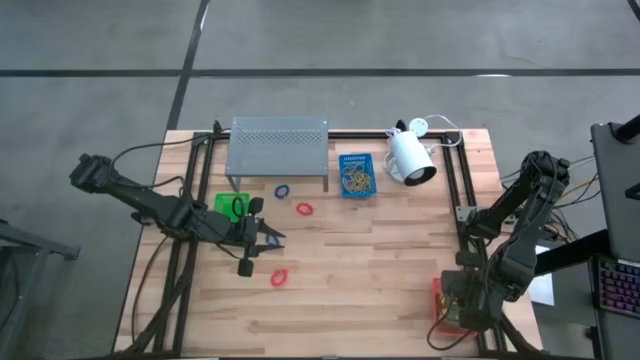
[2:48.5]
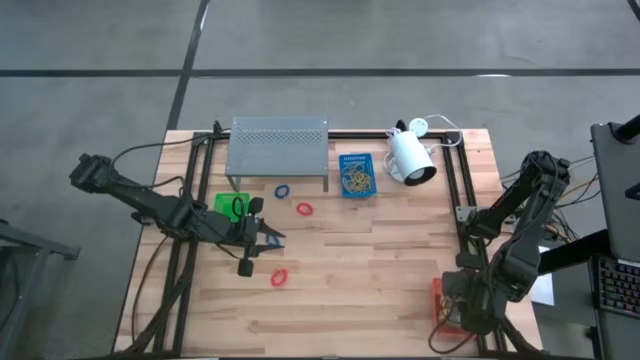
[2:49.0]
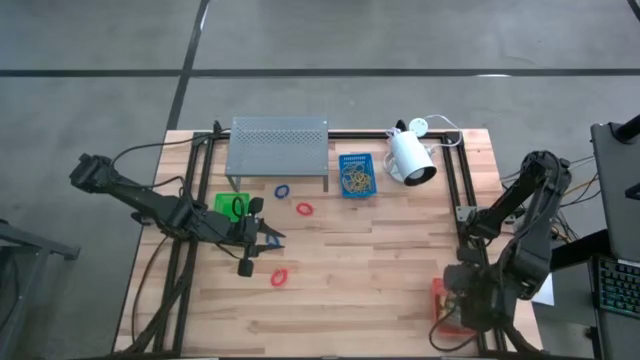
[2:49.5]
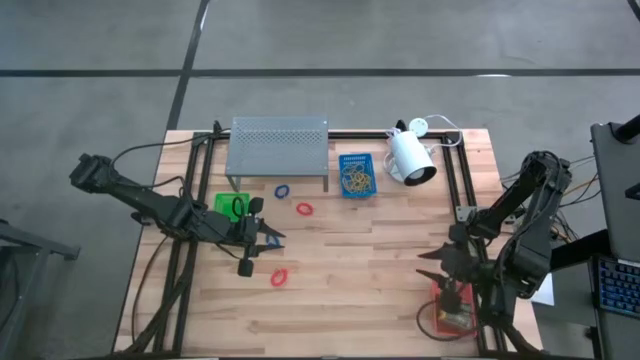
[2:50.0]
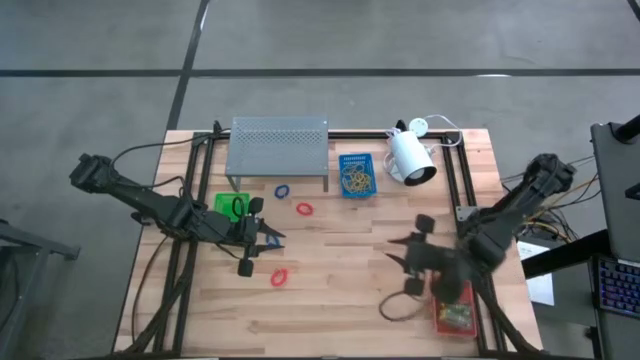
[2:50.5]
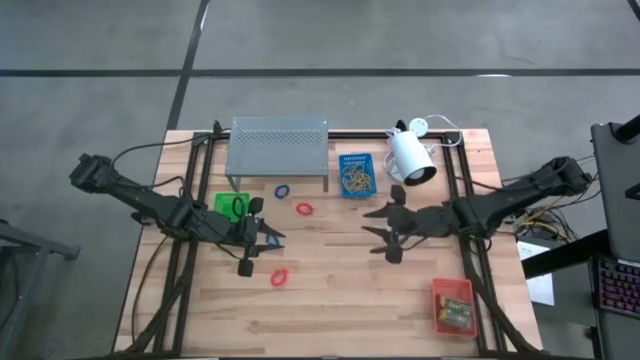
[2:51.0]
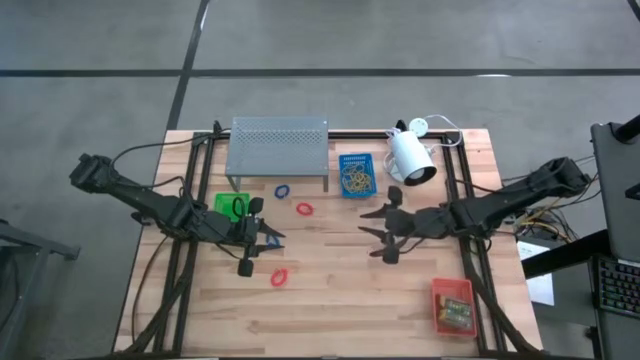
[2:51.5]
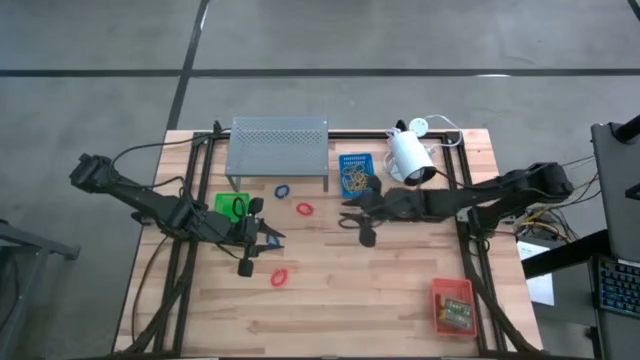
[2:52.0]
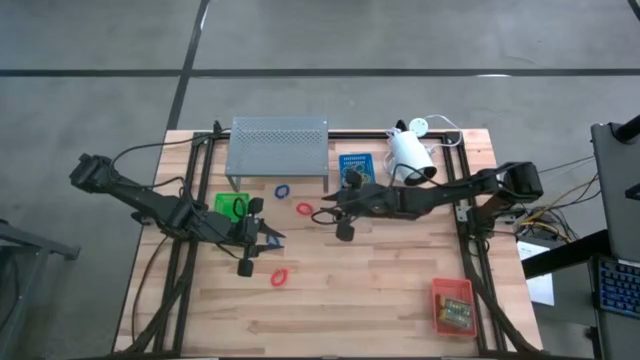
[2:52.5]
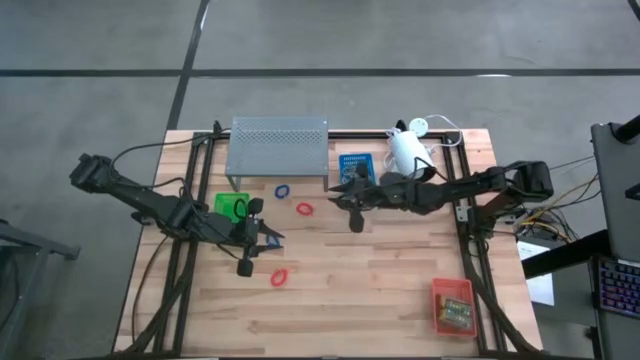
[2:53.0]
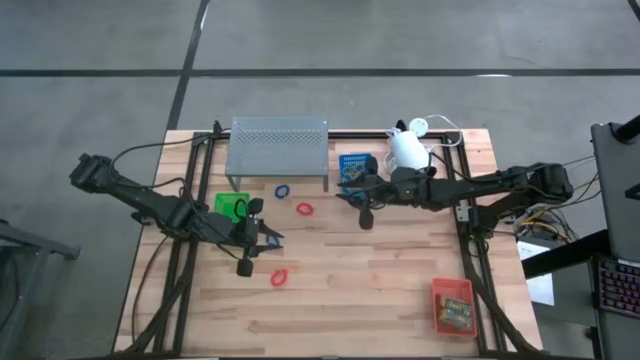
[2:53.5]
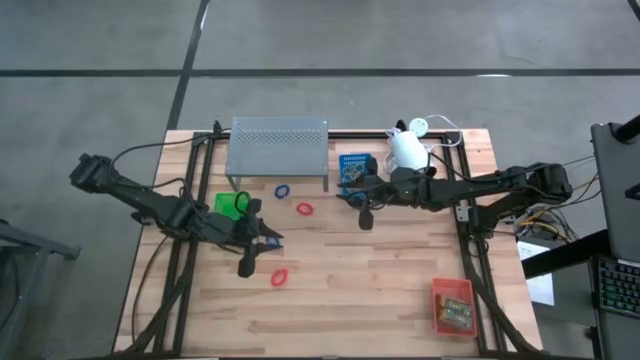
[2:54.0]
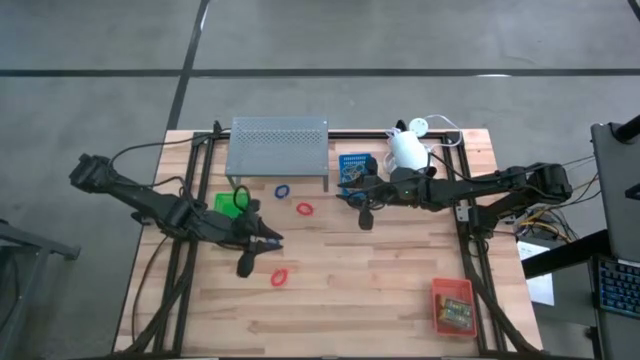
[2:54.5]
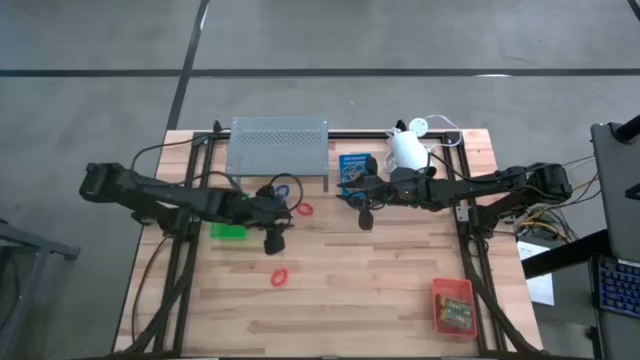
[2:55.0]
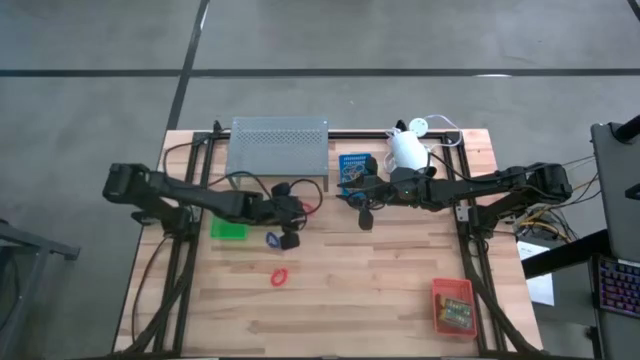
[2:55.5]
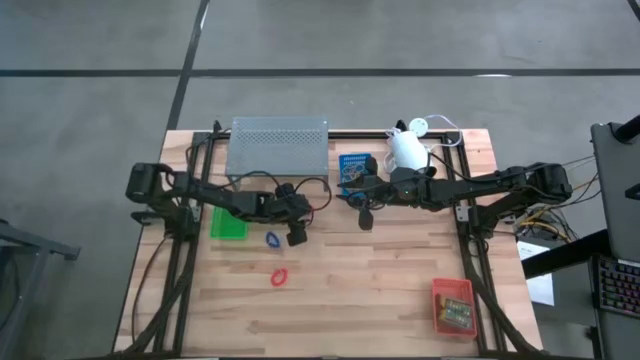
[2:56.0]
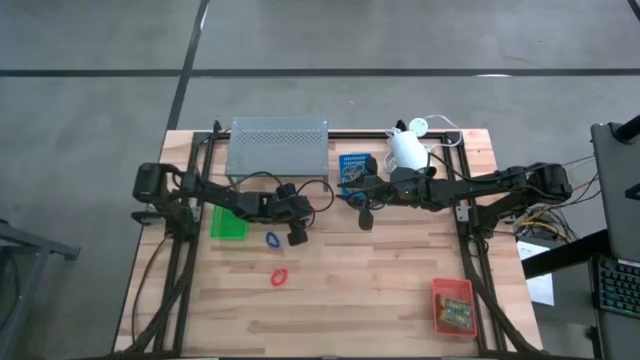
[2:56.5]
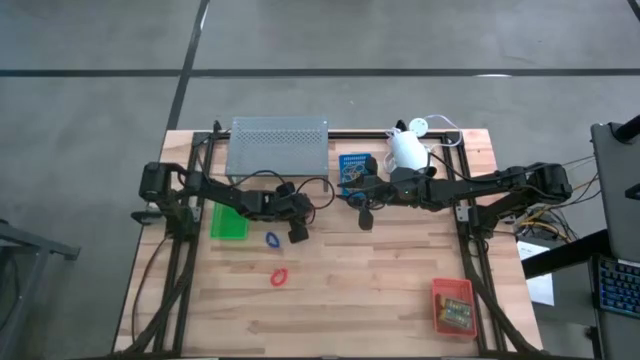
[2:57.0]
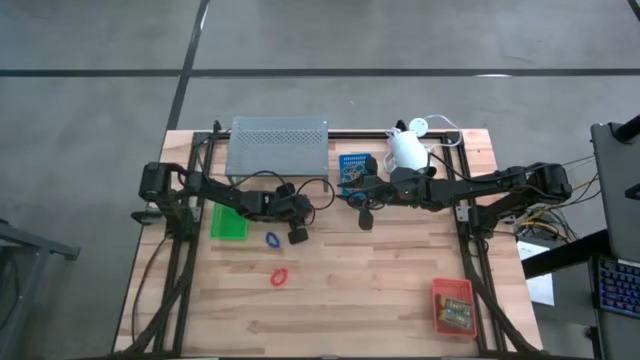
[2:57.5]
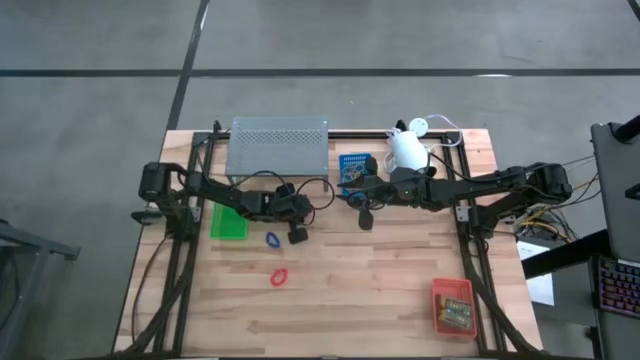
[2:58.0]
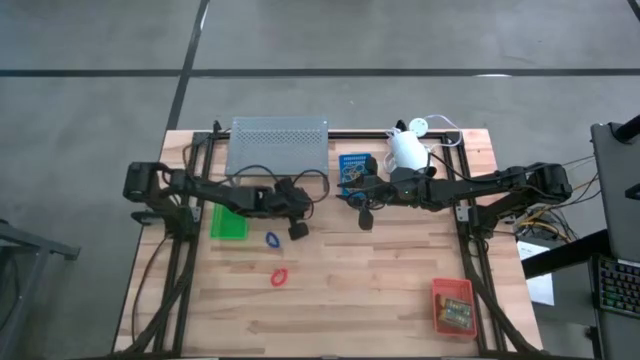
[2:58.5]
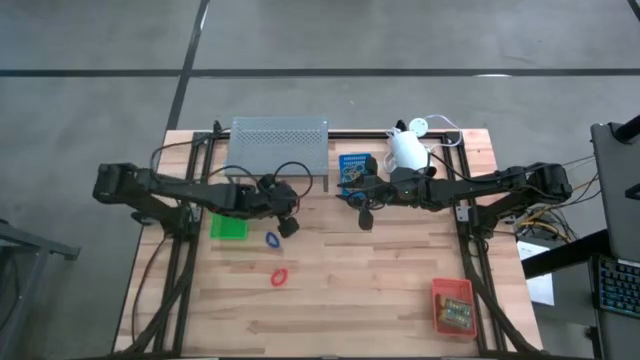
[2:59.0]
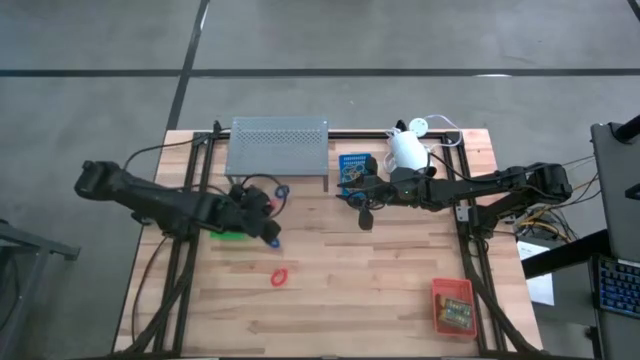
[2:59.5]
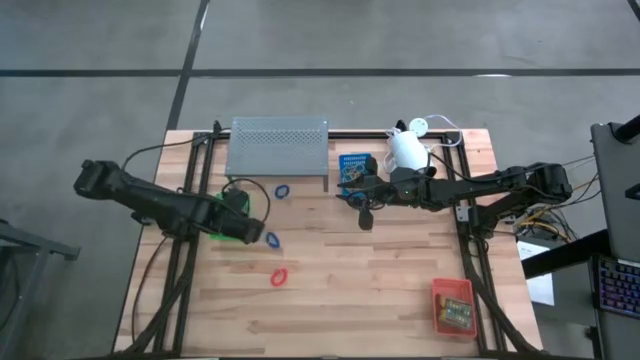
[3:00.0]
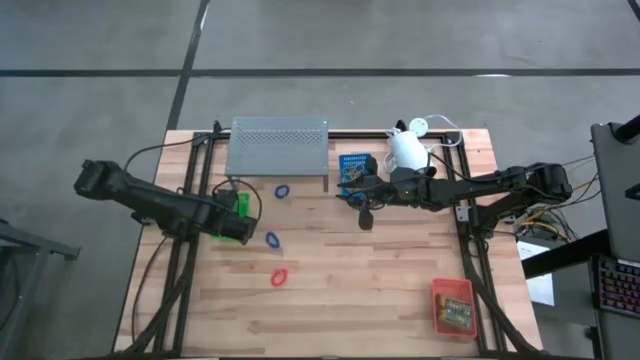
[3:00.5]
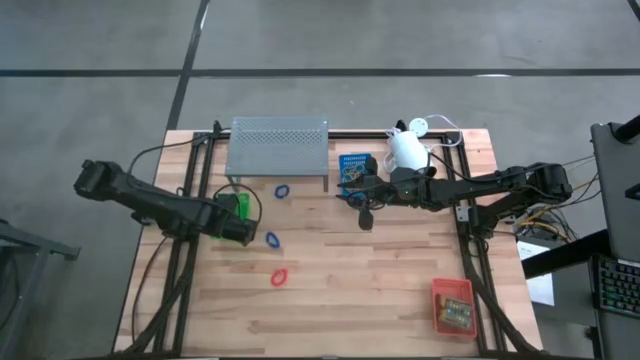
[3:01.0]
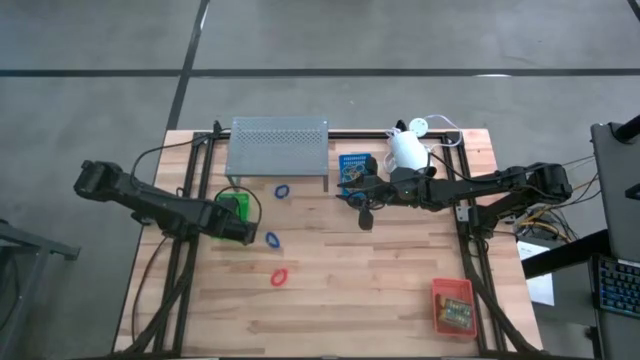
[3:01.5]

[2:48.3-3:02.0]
Task: Pick & Place Office Desk Supplies
Put the orange spring keychain into the green bin

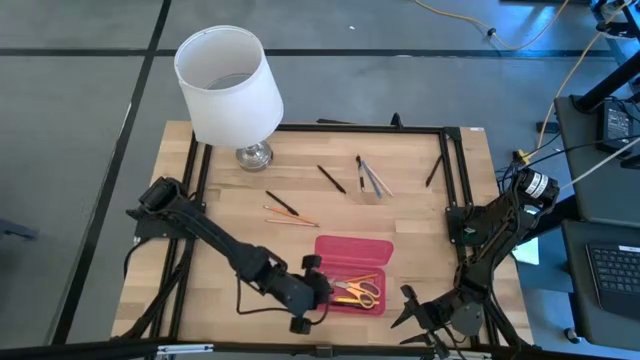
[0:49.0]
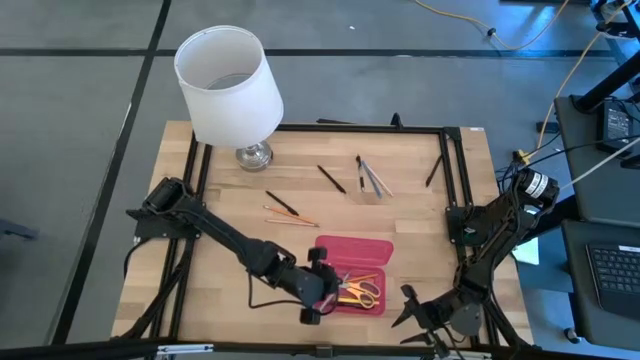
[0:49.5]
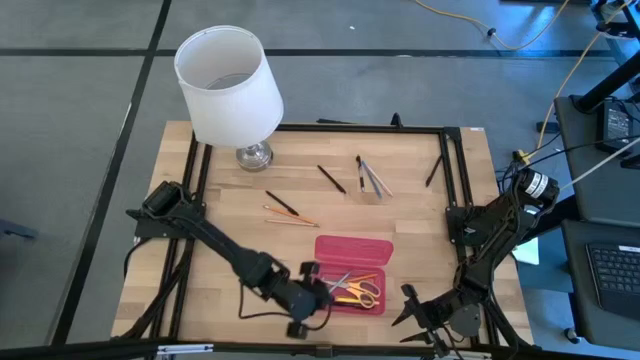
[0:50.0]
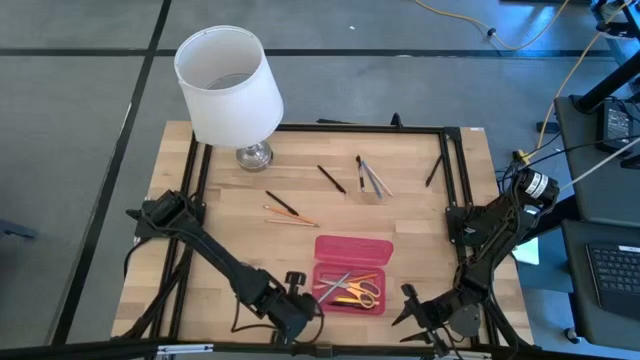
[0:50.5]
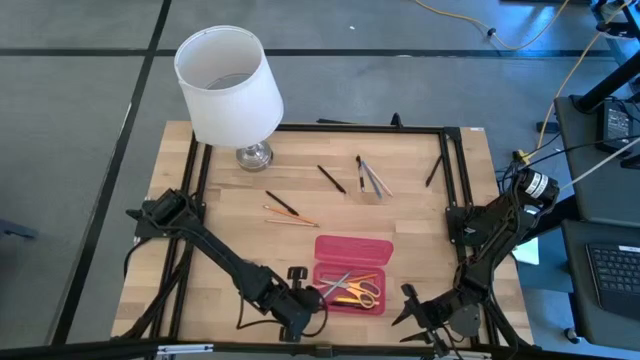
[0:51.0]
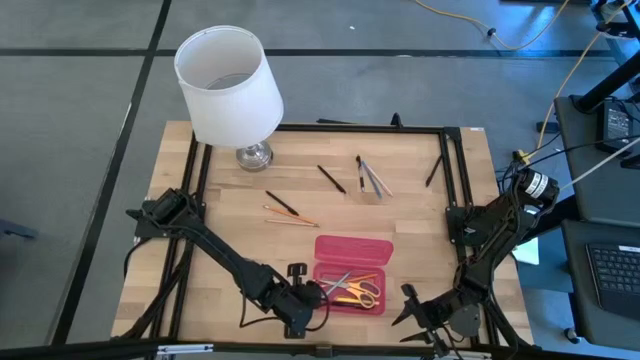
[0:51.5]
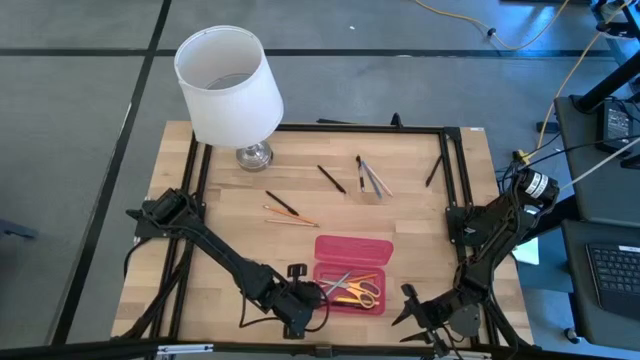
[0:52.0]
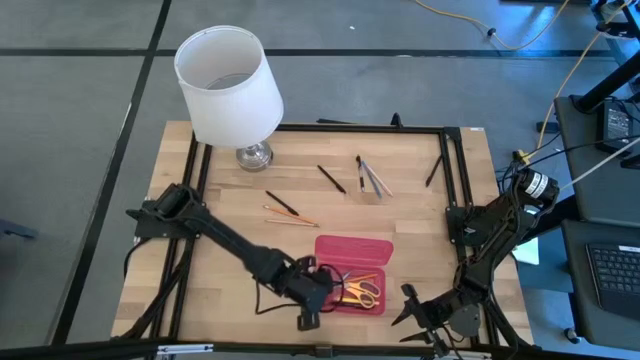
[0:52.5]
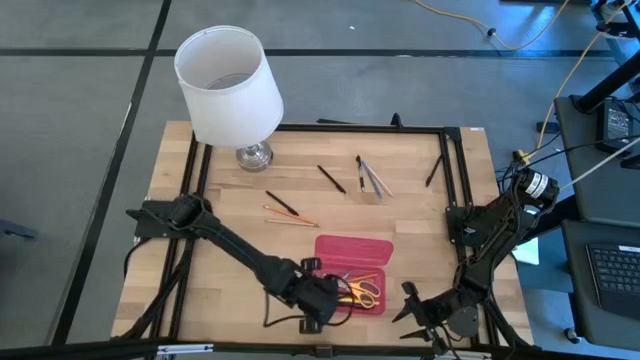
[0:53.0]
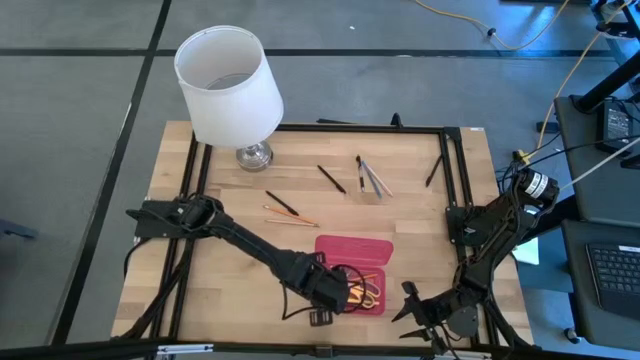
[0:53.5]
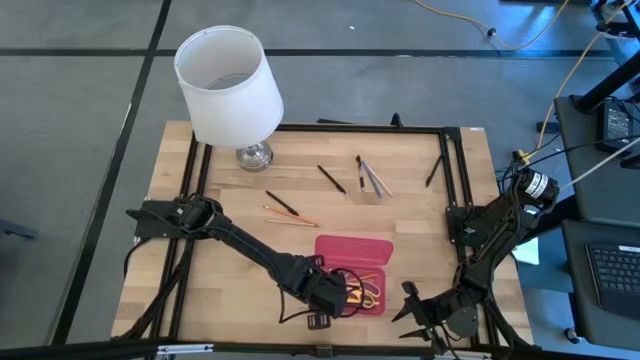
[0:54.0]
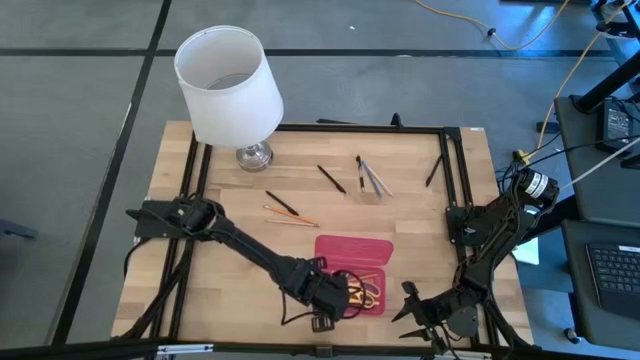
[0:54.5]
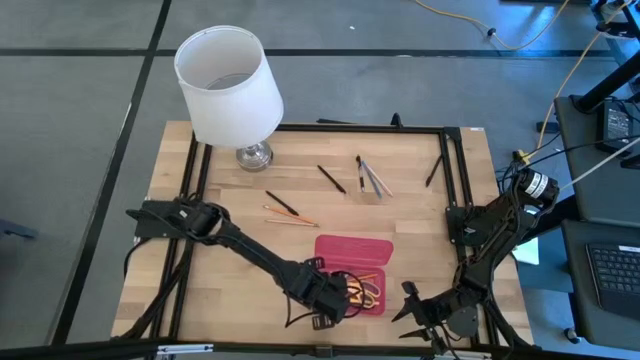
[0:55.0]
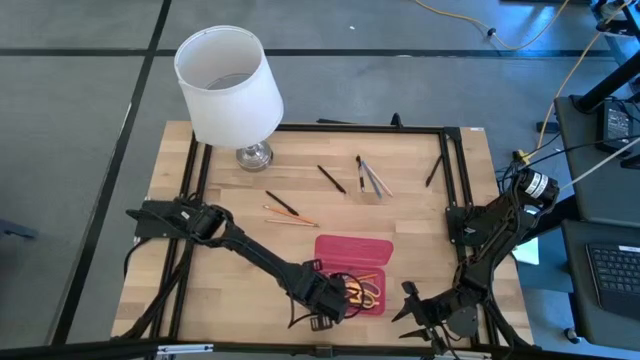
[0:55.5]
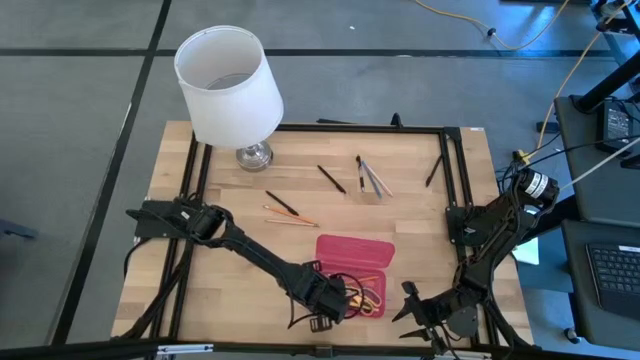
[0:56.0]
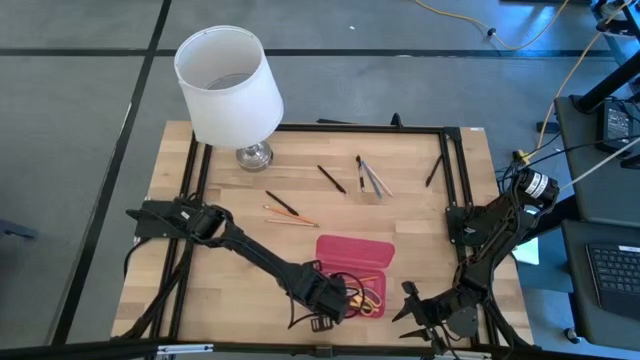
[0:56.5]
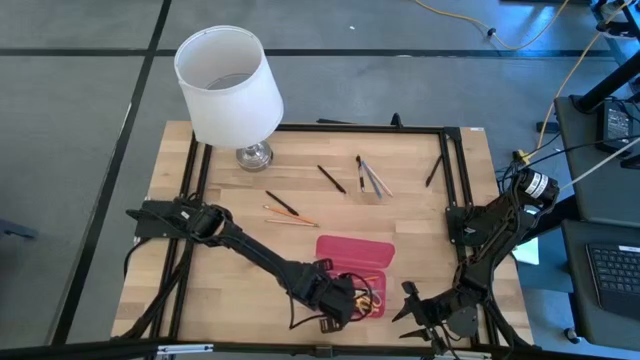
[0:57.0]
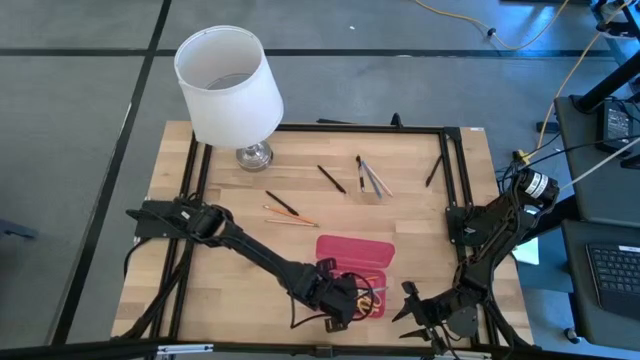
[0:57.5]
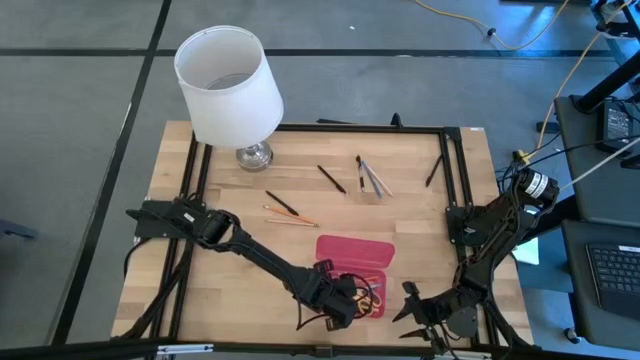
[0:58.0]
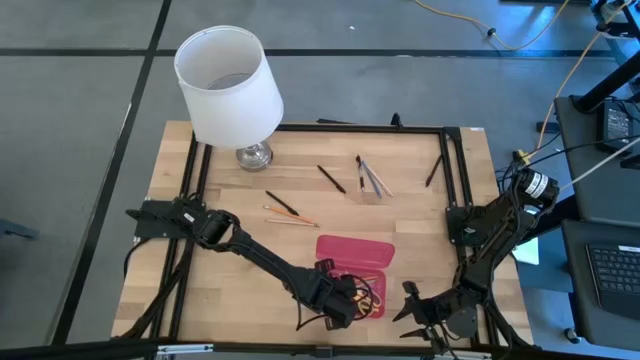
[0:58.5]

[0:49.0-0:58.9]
Task: Pick & place school supplies into a supply box
Put the blue supply into the pink supply box
